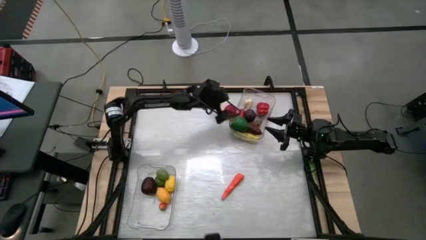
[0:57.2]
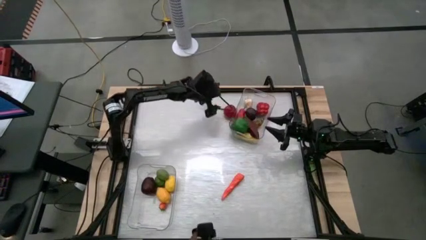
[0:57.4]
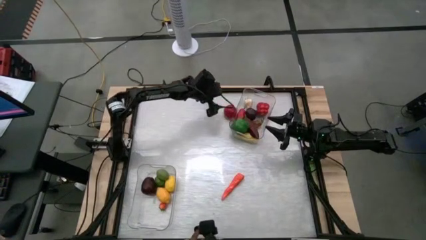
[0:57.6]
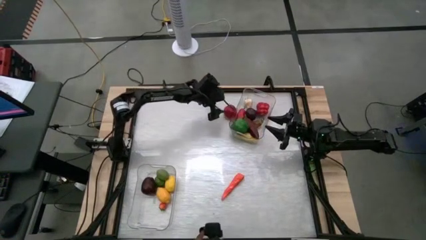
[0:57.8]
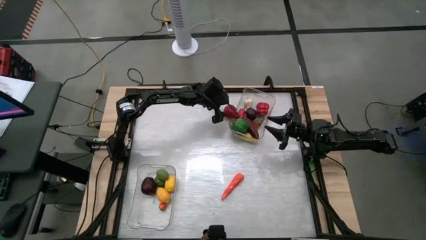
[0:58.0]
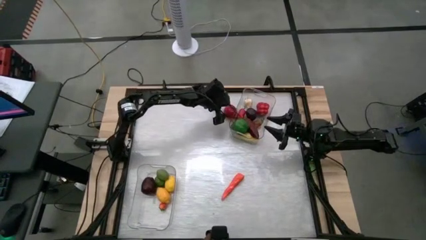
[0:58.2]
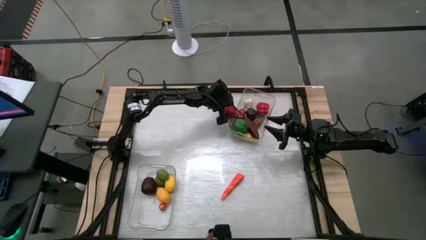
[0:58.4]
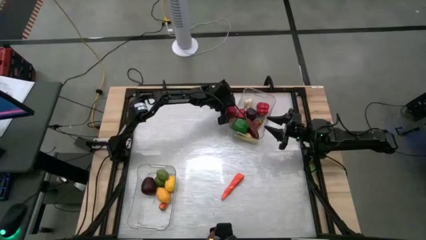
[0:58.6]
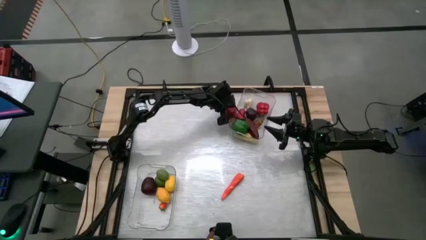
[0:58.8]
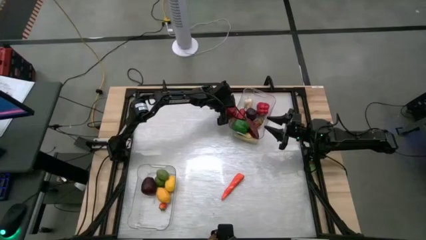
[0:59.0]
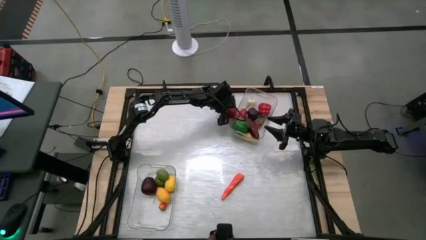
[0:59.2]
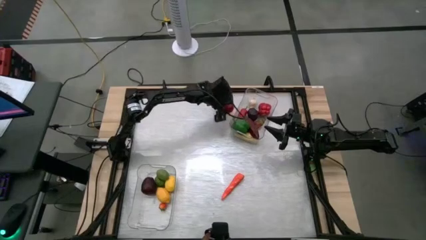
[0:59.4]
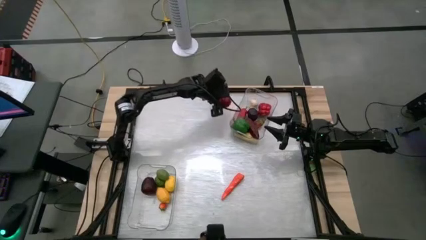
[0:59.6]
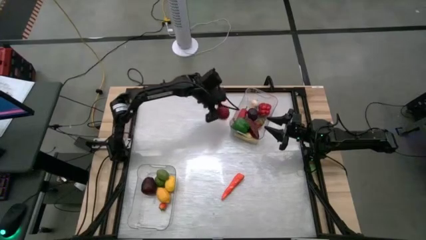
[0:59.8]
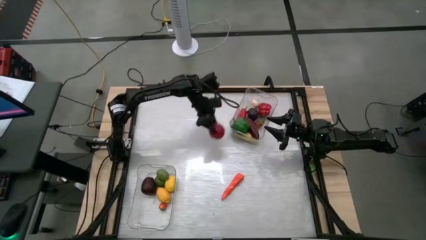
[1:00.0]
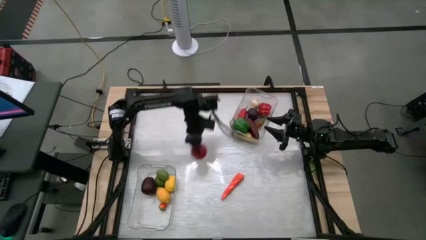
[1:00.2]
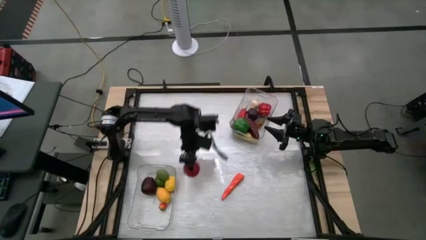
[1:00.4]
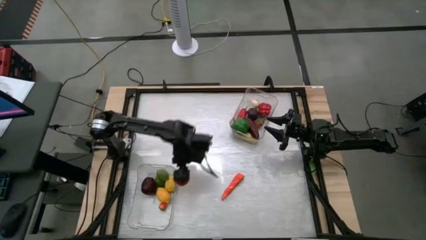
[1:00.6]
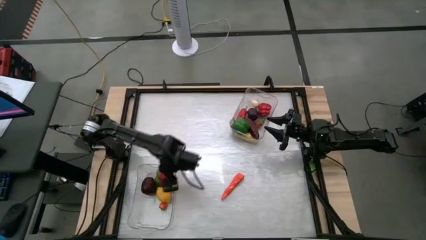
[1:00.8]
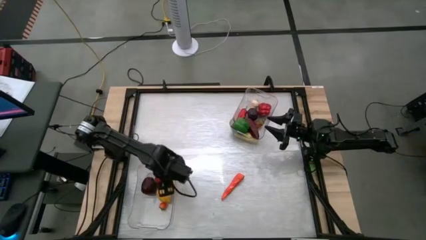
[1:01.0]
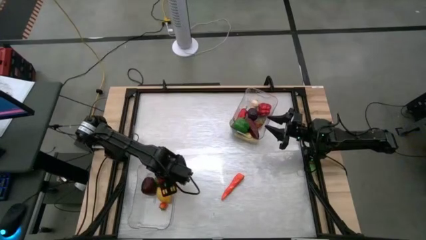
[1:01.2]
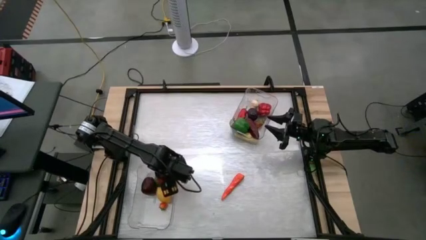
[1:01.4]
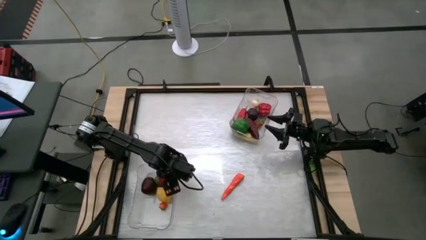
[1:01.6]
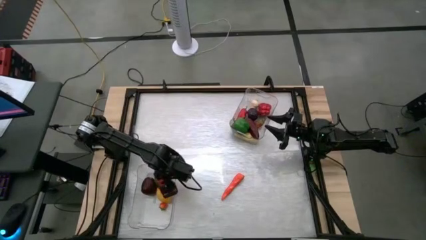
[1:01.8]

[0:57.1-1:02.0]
Task: Sort produce into baskets
Put the red tomato into the bottom transparent bin

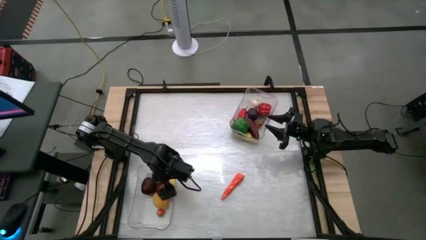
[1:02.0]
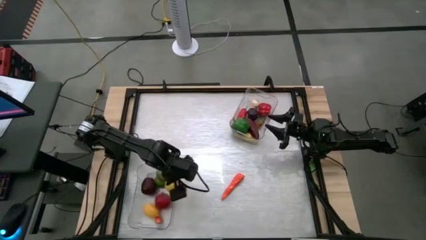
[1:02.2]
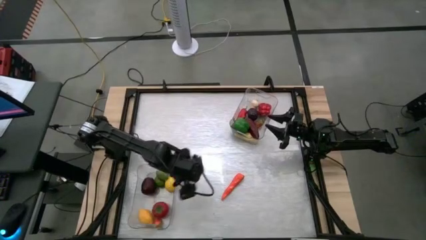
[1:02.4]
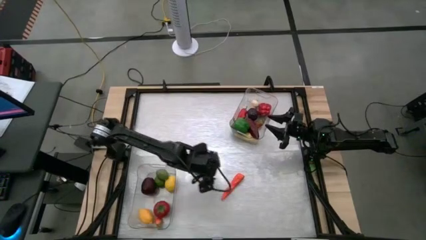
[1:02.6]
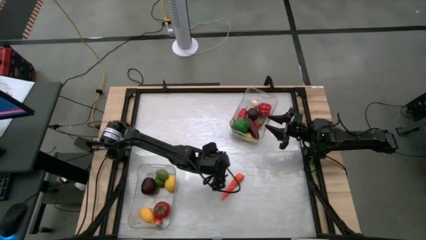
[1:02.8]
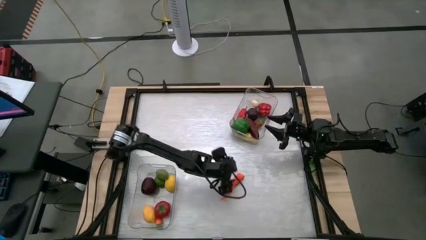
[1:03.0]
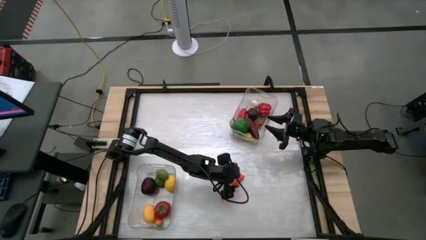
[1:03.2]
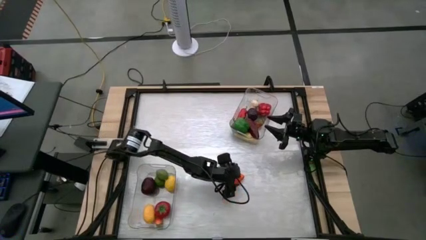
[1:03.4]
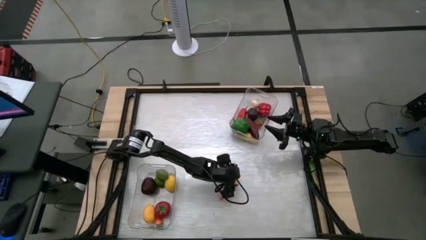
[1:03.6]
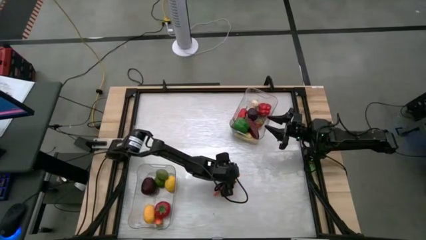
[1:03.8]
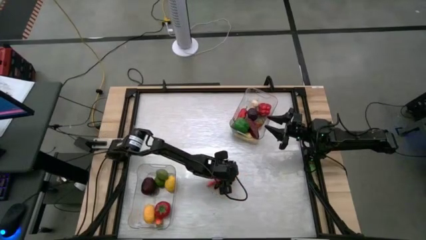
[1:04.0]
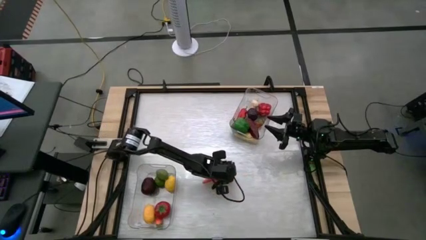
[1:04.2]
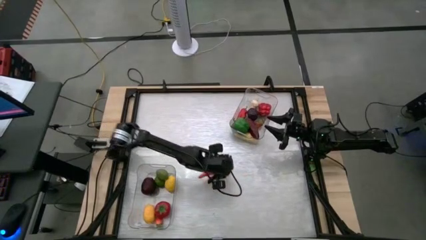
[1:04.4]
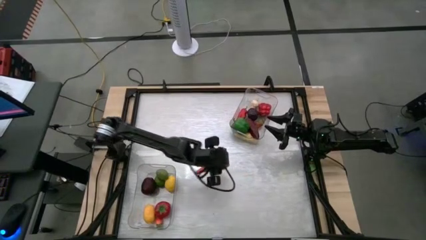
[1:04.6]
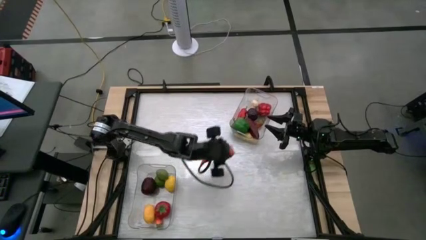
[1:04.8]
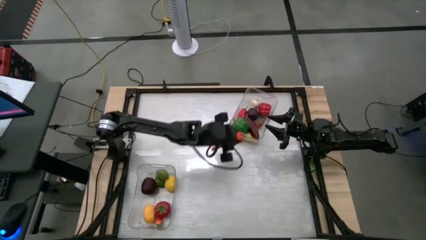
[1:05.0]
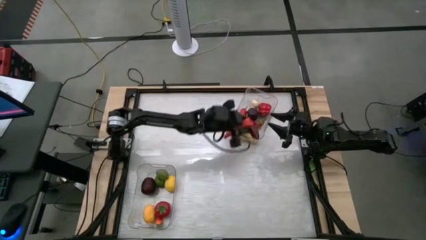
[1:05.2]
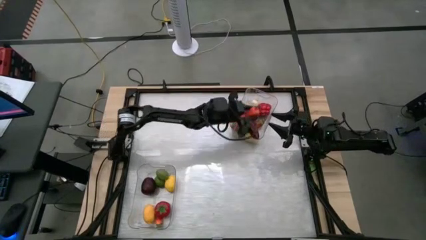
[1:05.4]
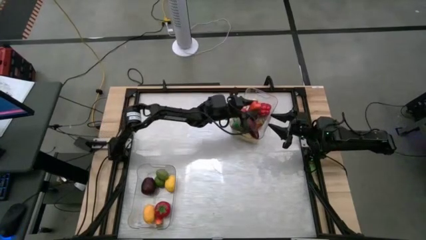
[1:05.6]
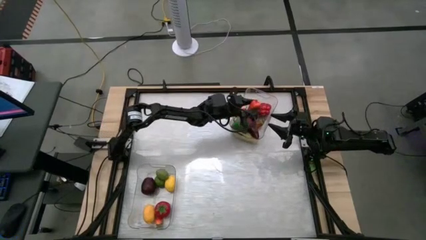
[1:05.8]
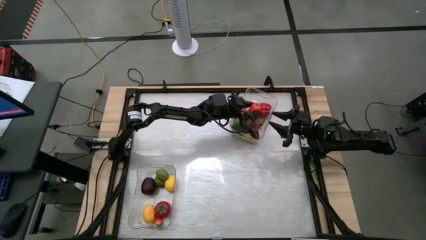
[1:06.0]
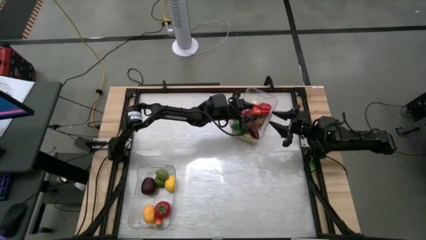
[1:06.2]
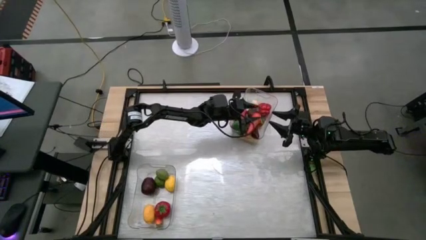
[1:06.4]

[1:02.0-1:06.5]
Put the orange chili pepper into the top transparent bin

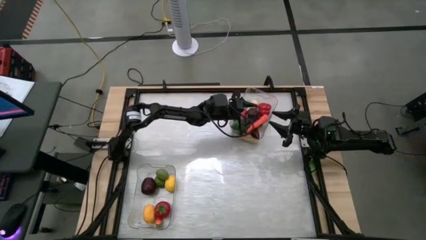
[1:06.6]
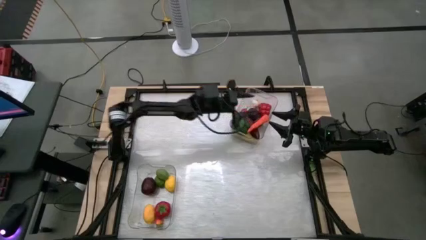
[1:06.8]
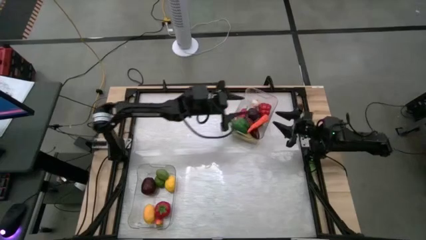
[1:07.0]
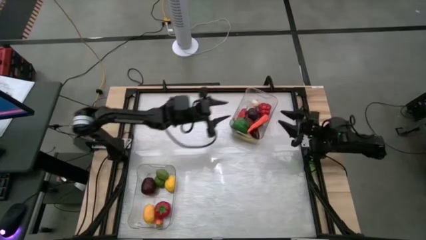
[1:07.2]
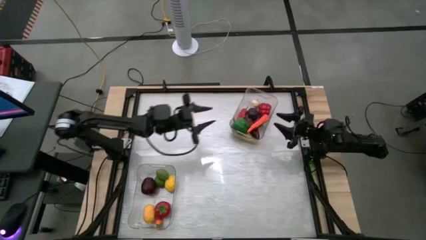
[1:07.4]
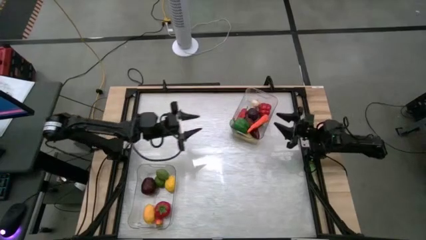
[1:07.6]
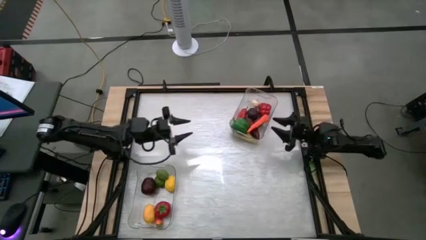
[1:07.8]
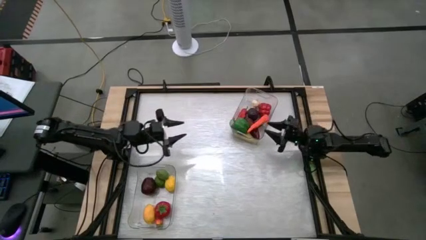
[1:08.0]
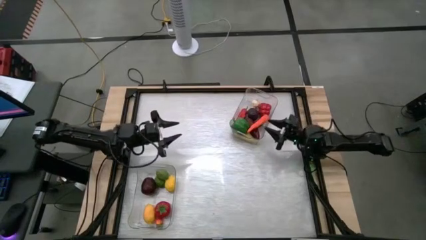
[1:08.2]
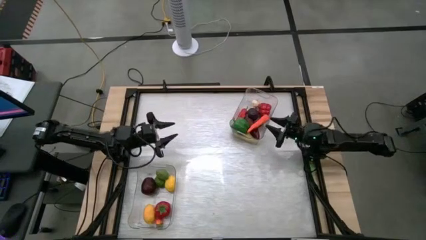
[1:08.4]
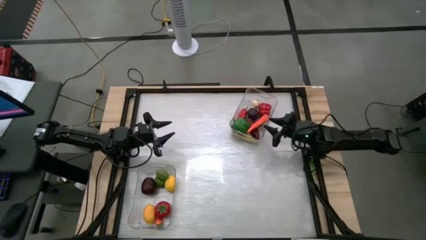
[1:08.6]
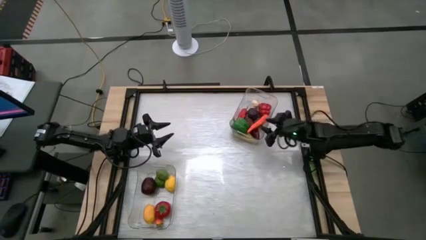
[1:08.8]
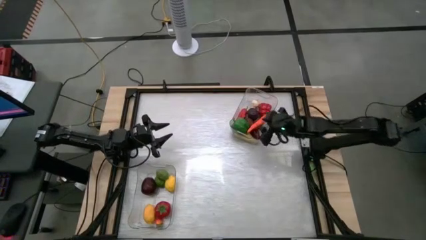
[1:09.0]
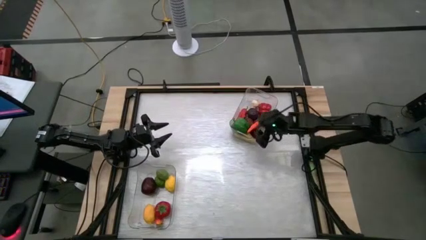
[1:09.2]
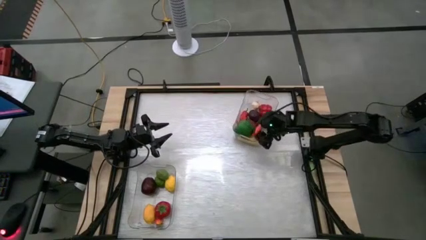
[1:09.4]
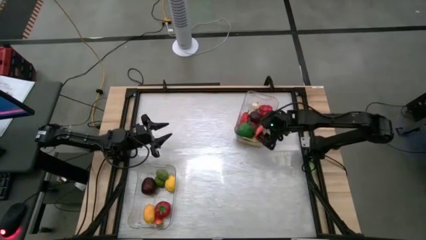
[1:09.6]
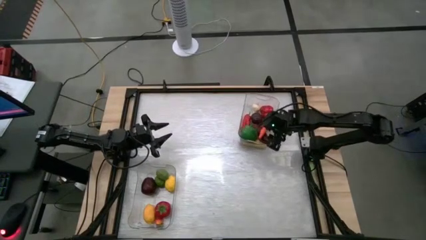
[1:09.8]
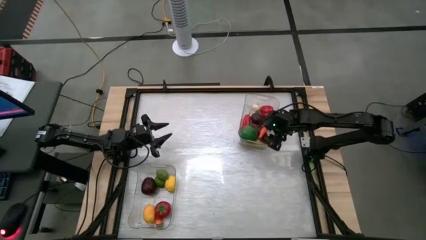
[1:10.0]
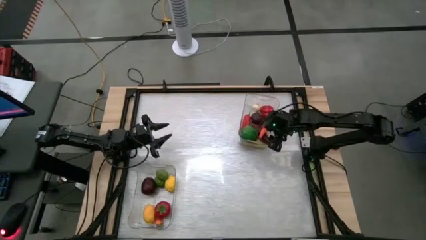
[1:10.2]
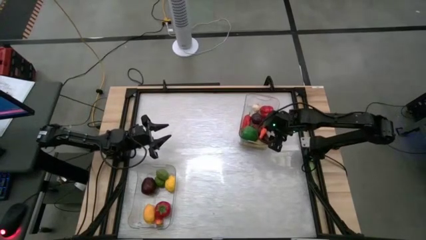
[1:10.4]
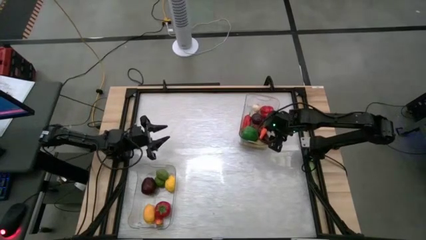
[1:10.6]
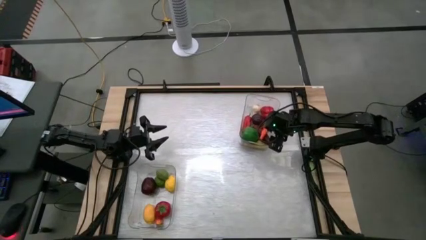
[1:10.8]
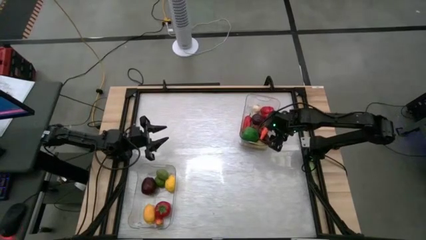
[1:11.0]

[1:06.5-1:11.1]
Adjust the top transparent bin

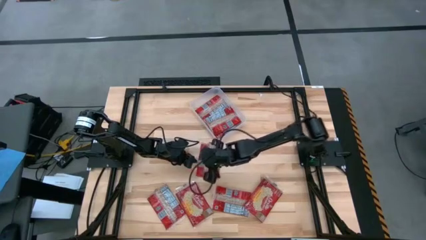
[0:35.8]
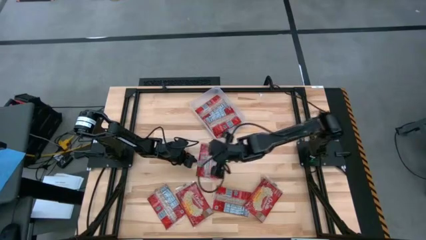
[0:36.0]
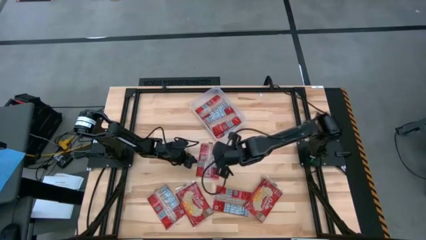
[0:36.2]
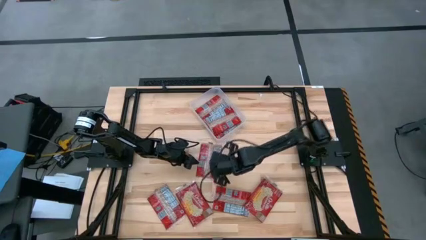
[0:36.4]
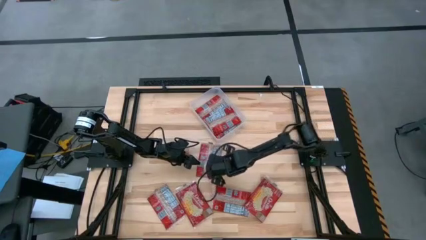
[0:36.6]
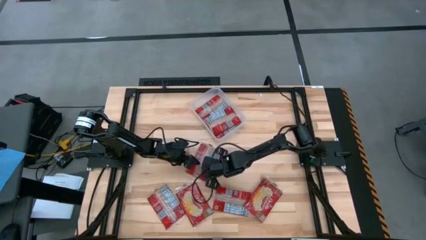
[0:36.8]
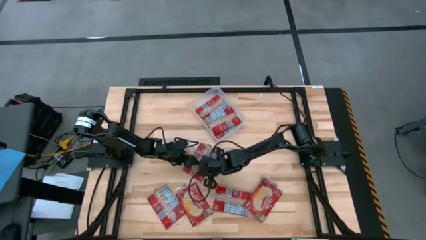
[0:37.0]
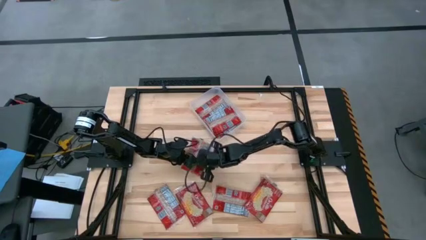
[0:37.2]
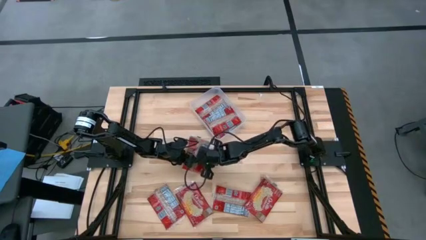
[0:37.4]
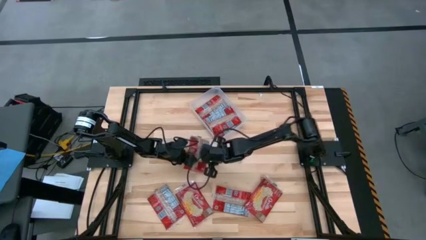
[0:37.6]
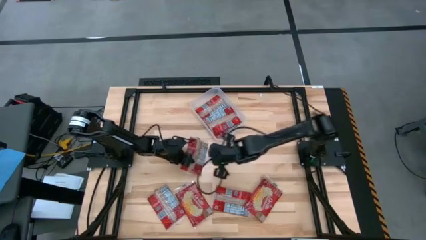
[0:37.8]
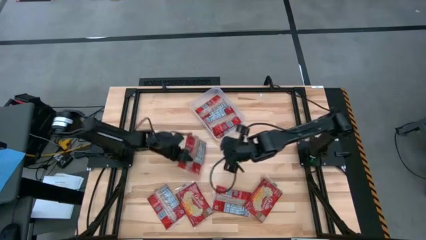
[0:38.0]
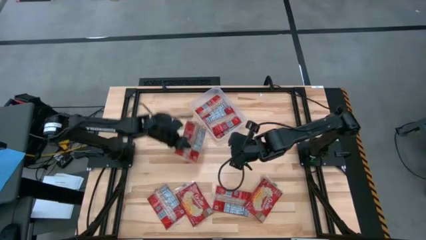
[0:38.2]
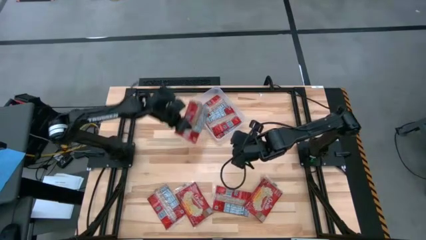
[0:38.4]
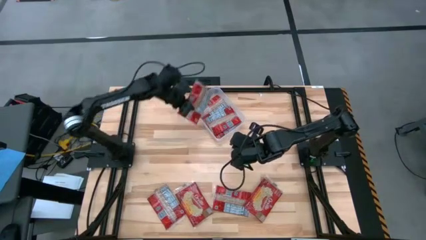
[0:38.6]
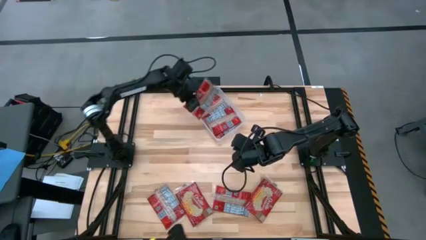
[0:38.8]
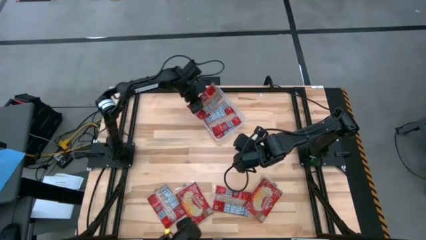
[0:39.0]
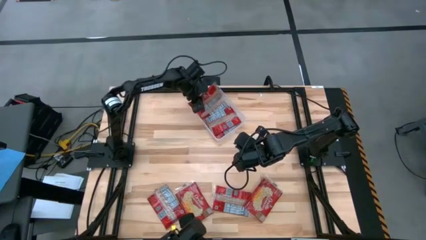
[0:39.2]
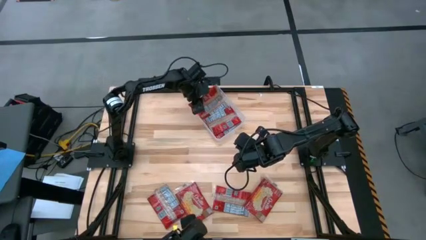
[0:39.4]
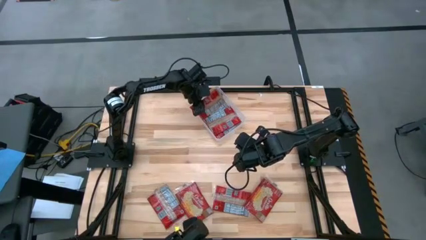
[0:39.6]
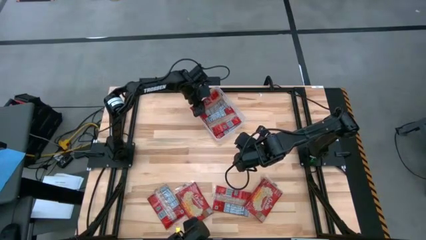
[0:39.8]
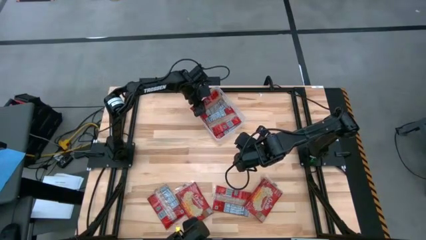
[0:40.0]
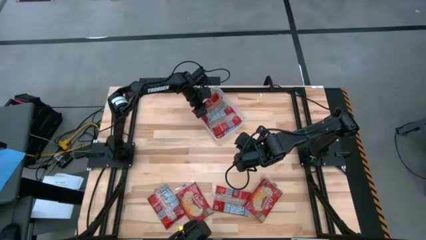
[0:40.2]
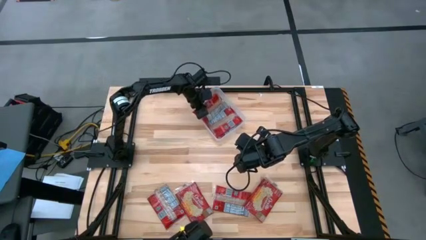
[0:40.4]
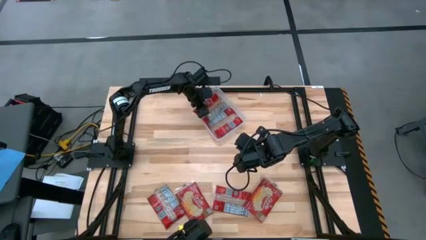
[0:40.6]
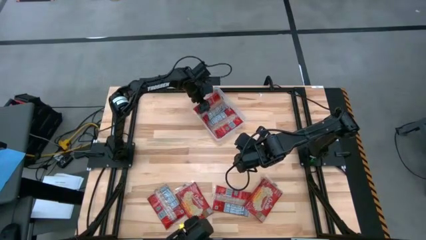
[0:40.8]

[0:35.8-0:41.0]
Task: Sort popcorn bags into baskets
Put the red popcorn bag into the white bin
